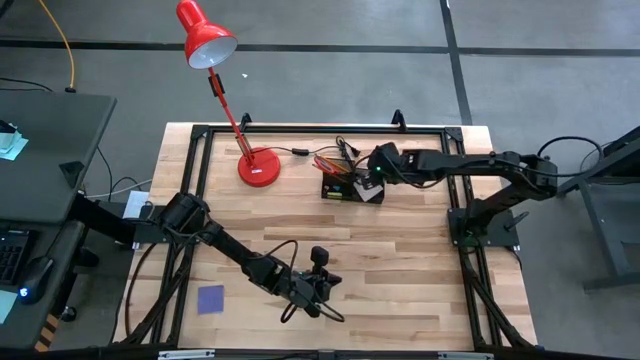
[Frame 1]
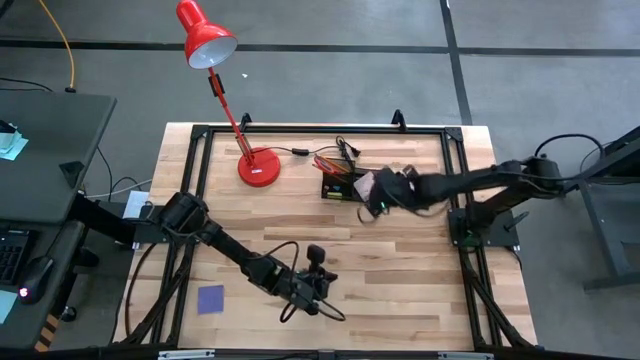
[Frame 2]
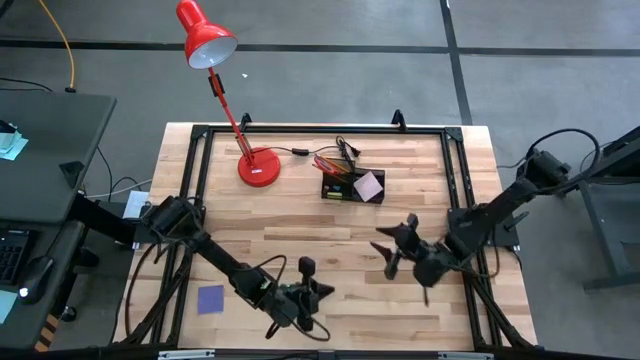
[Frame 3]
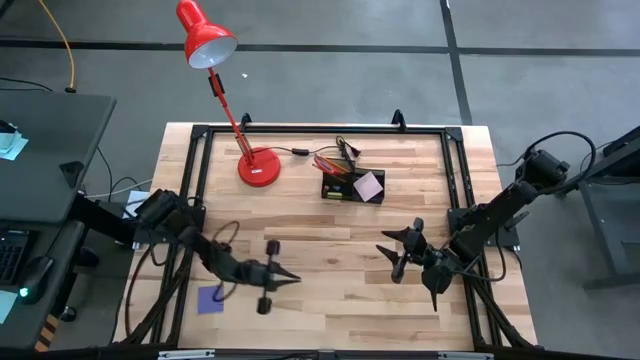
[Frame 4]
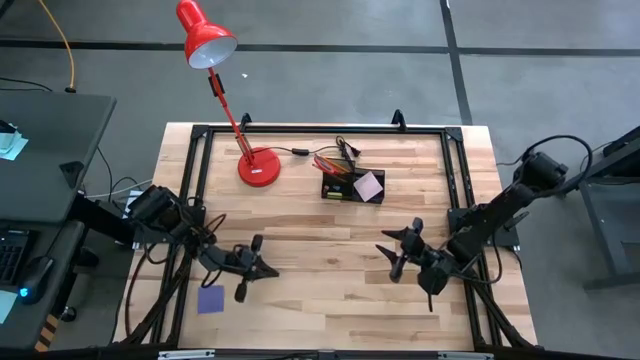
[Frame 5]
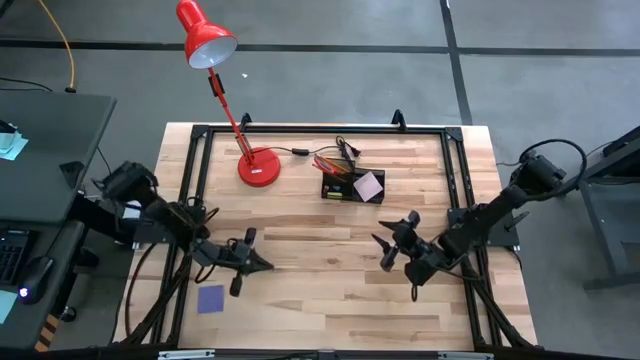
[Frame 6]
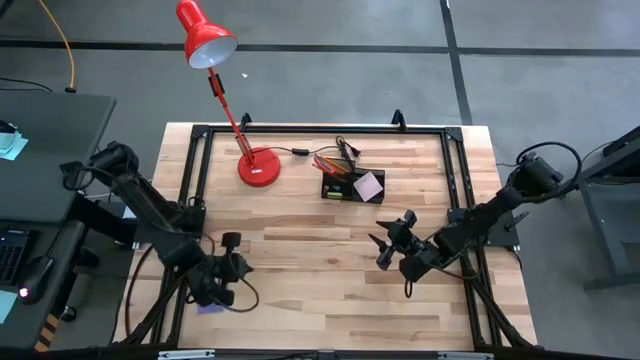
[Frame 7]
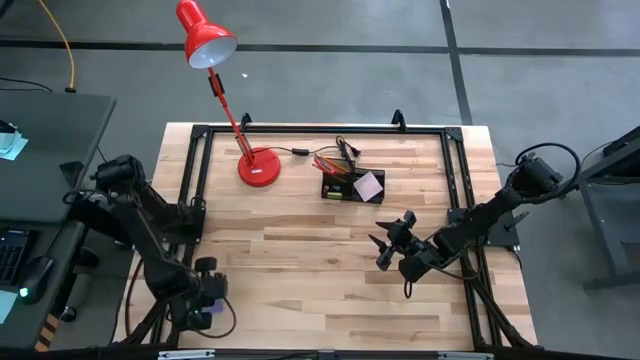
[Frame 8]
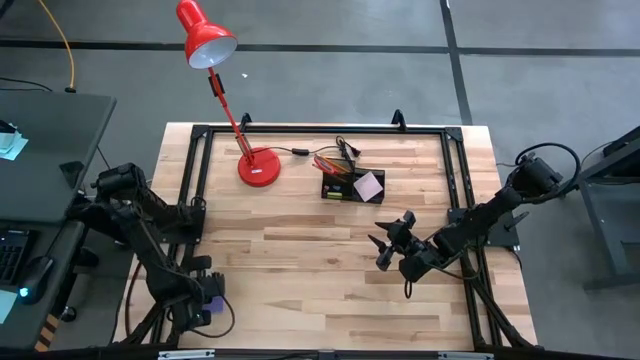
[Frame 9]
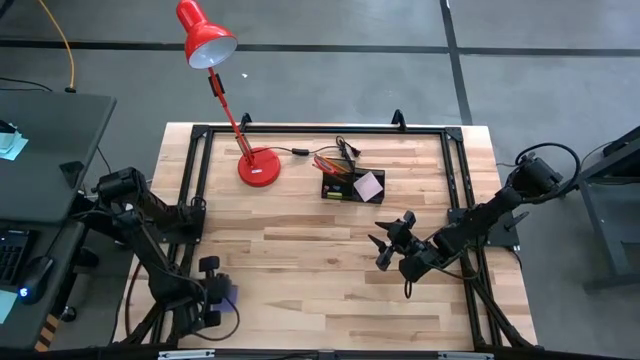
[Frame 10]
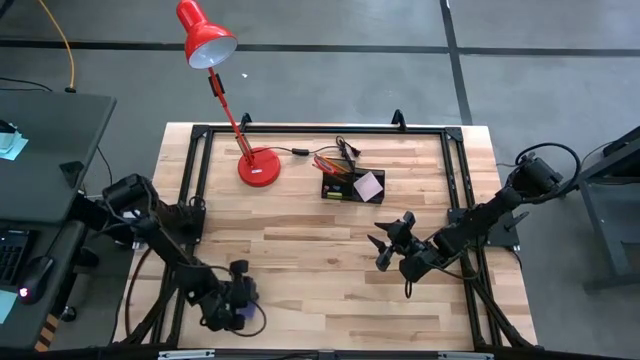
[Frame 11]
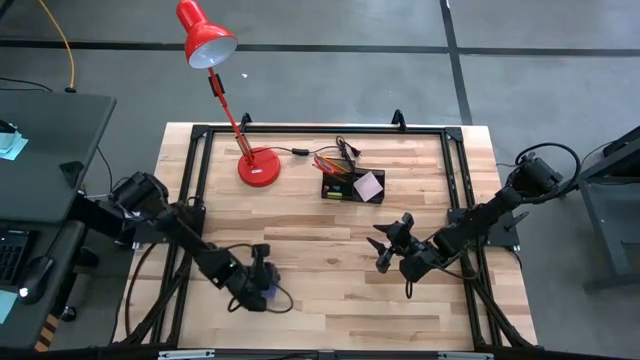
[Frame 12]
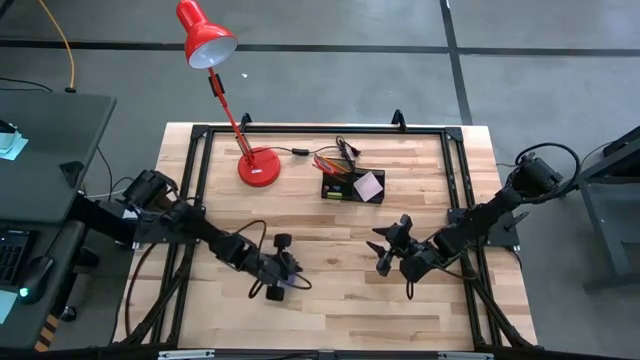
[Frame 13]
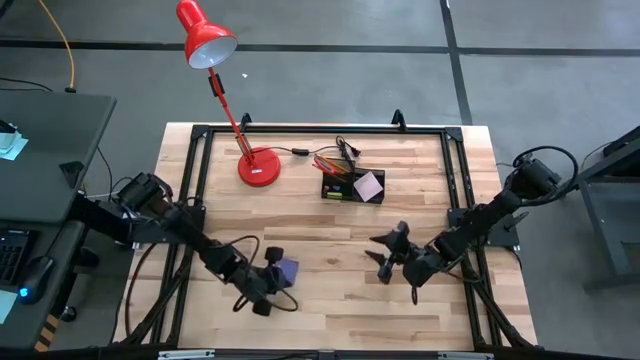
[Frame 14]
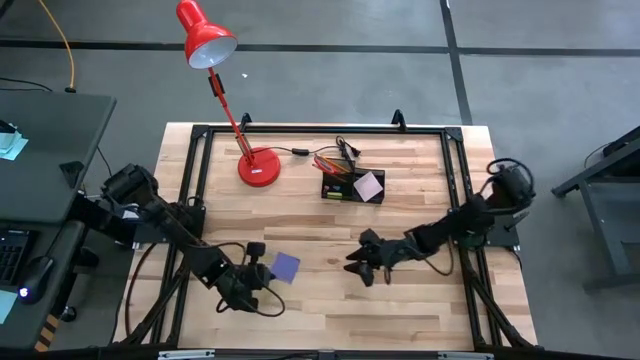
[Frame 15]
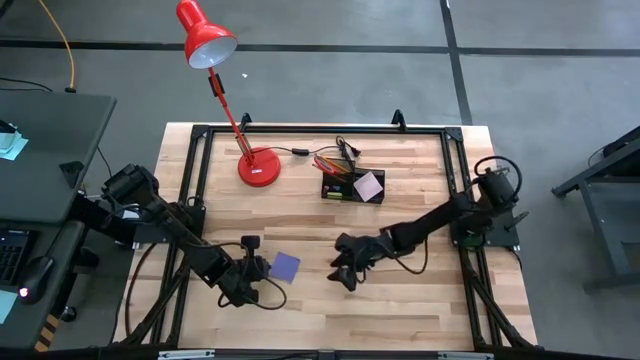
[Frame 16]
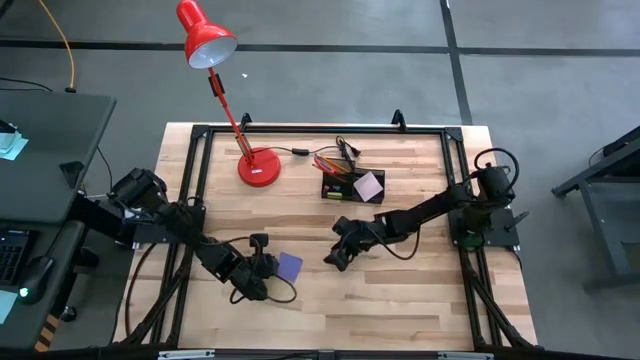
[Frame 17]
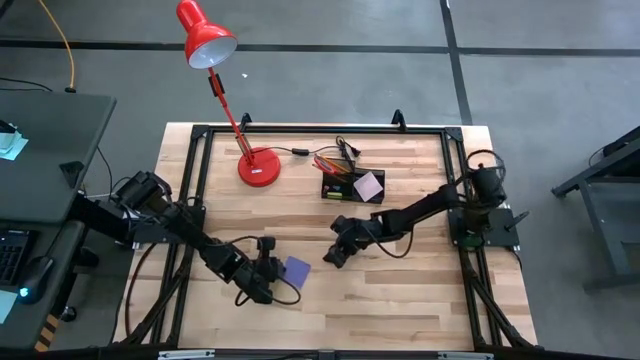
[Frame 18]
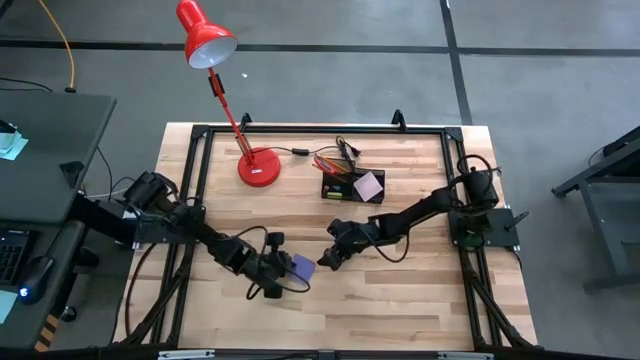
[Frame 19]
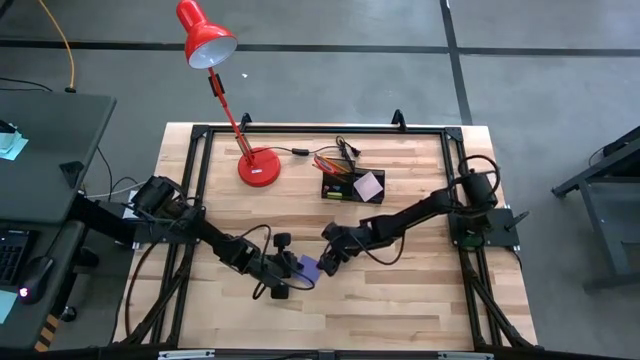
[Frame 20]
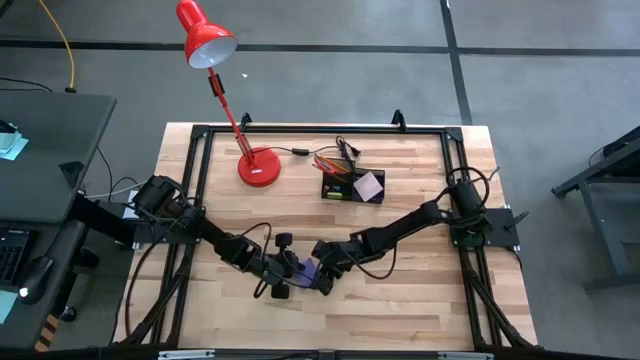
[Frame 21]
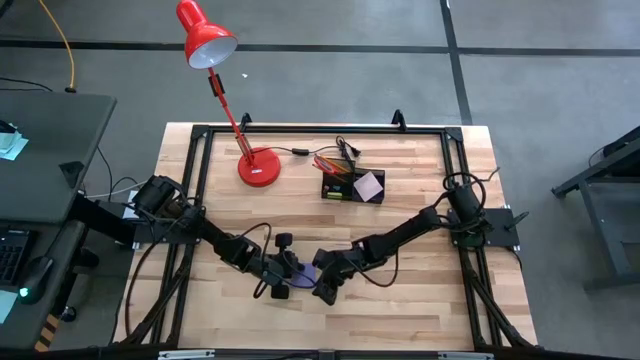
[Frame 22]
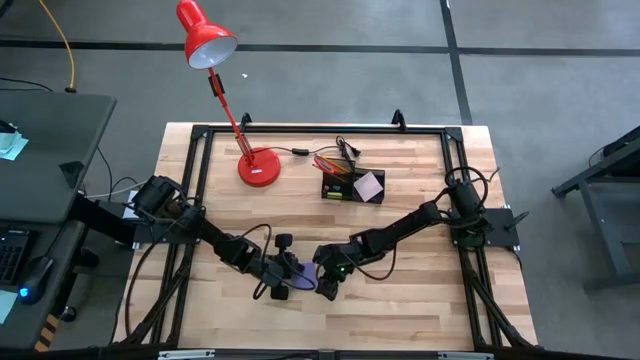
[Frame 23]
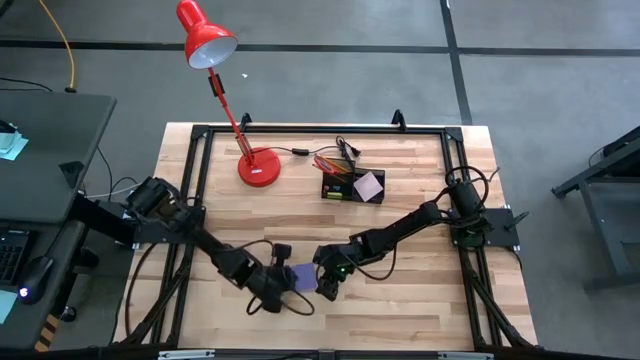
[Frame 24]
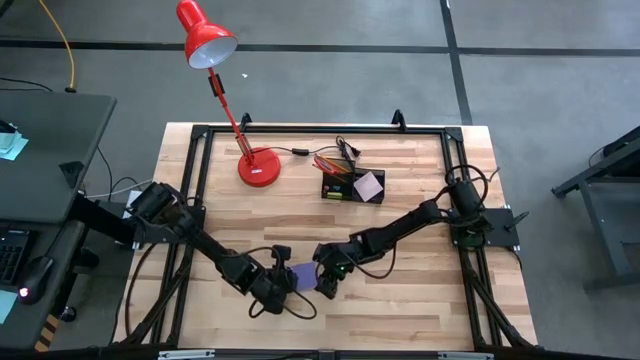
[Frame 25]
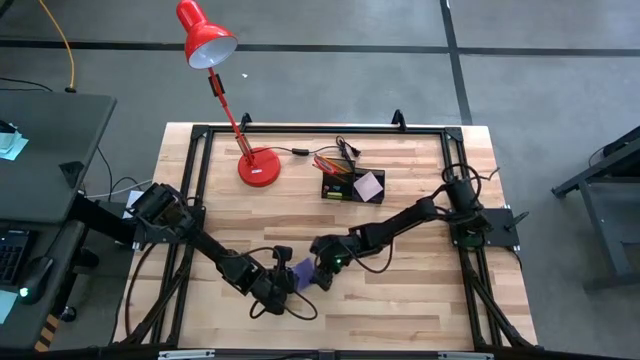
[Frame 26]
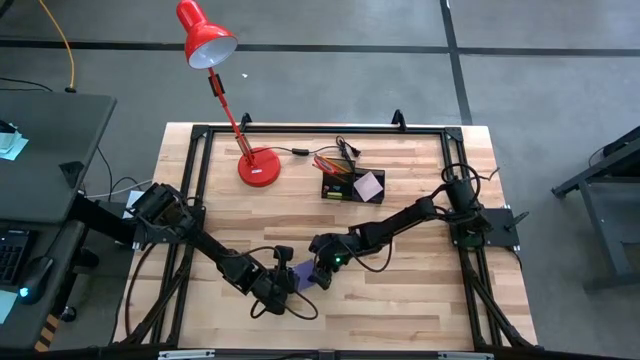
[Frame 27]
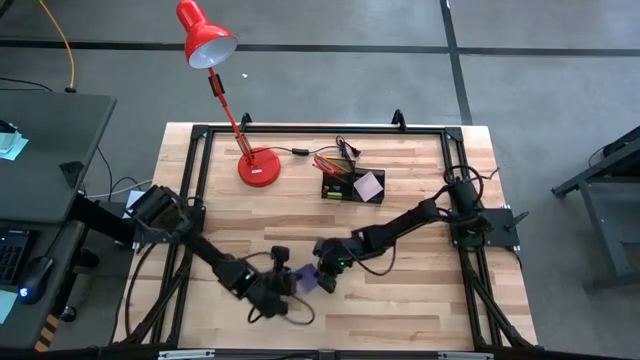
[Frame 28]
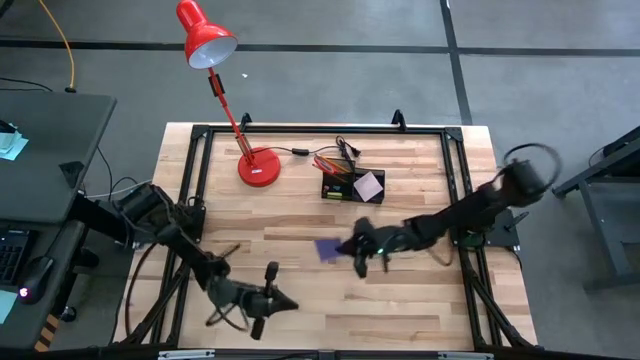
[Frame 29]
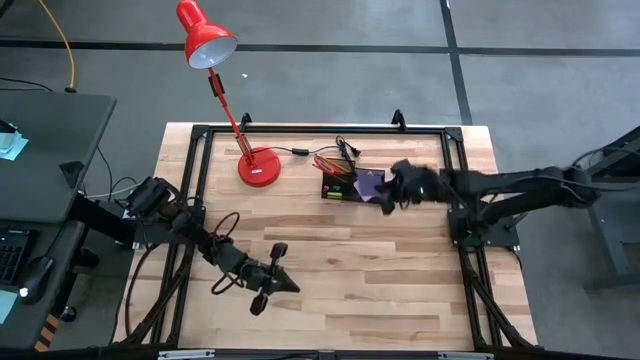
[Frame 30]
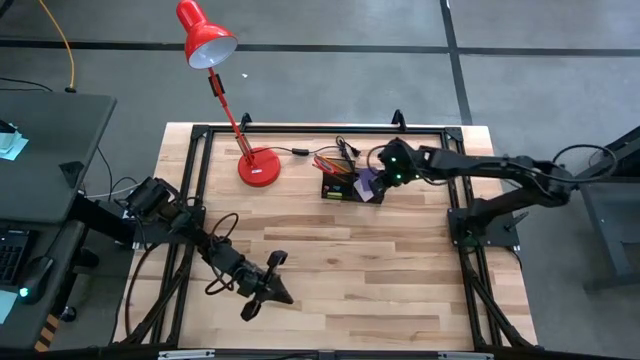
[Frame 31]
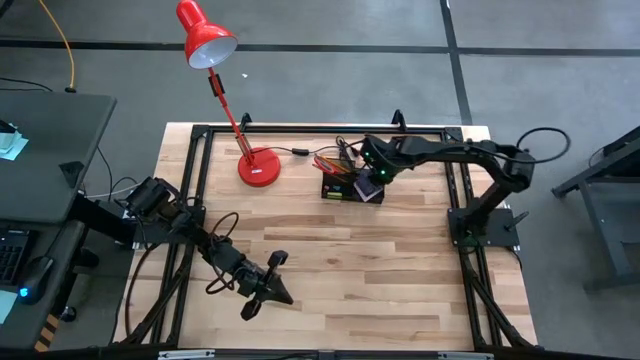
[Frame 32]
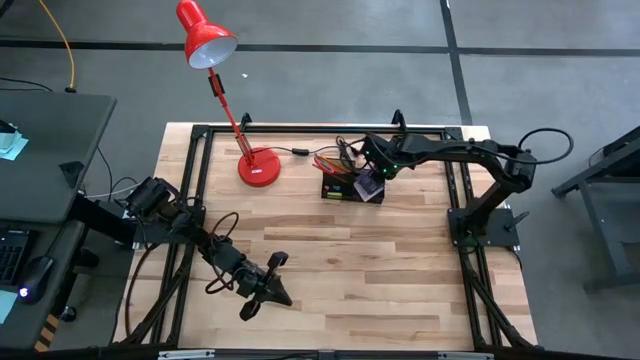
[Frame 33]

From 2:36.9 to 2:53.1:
Task: Pick and place office supplies into organizer
Put the blue sticky notes into the desk organizer

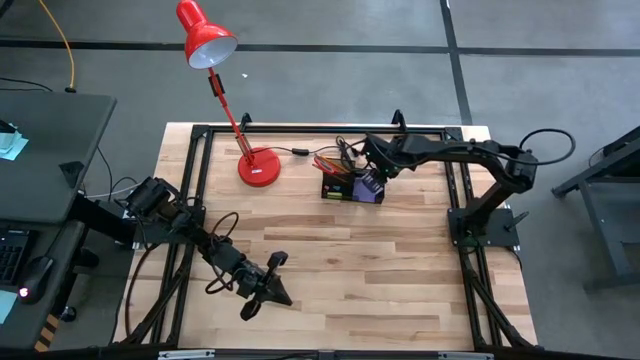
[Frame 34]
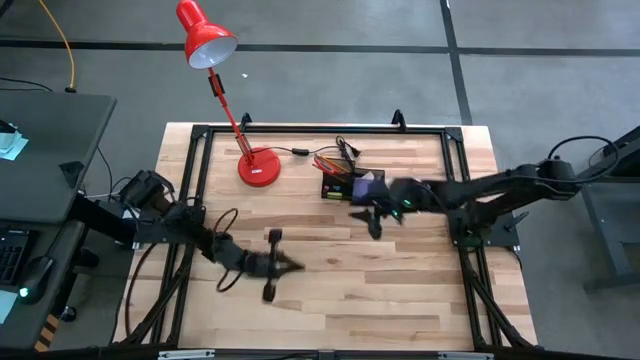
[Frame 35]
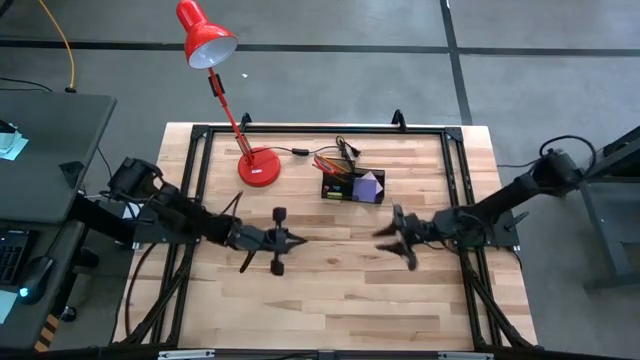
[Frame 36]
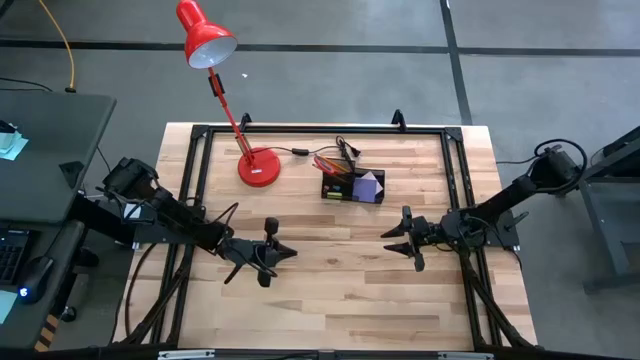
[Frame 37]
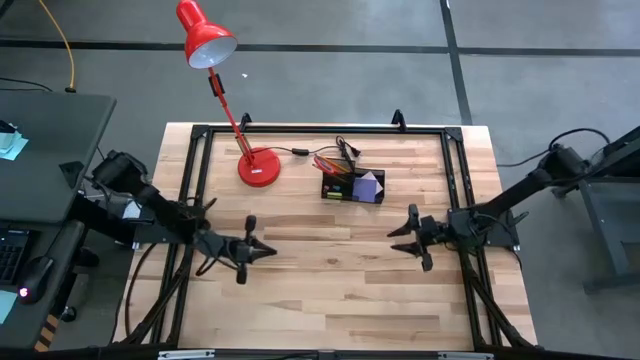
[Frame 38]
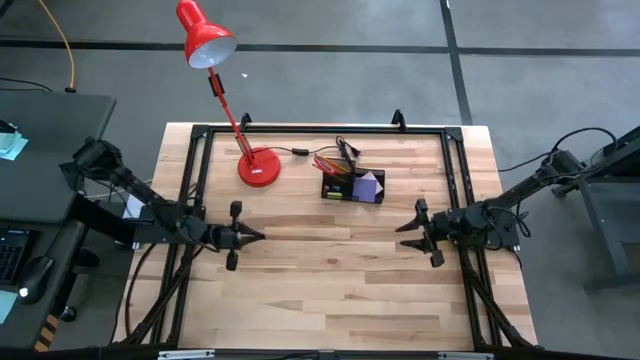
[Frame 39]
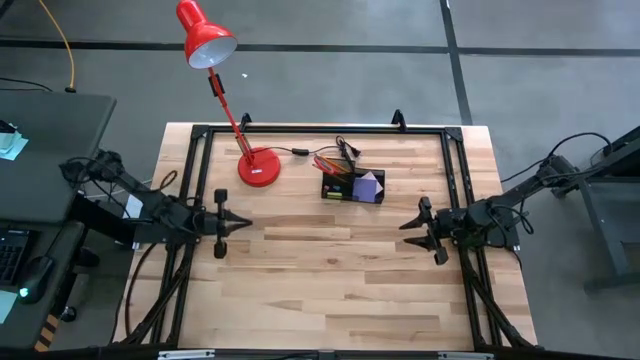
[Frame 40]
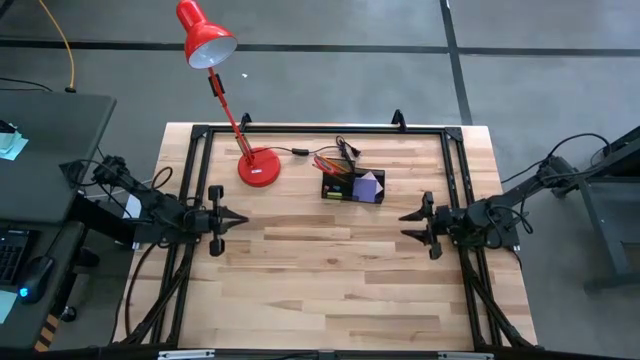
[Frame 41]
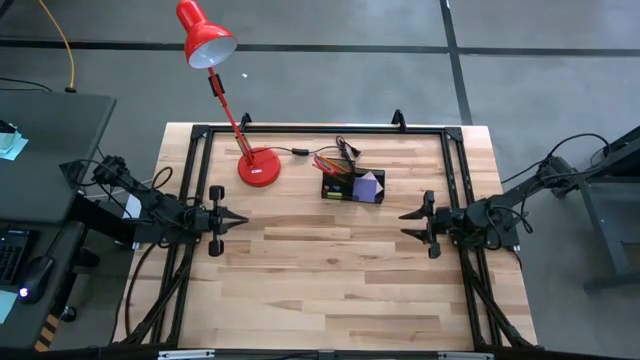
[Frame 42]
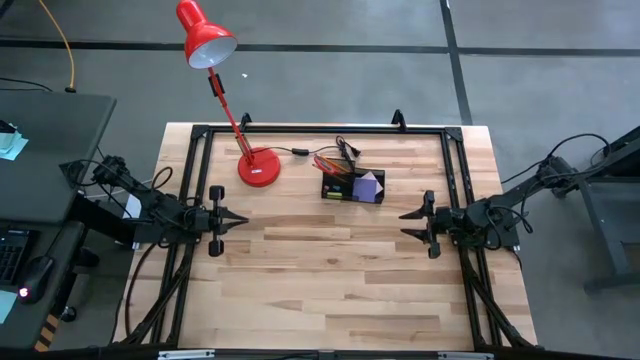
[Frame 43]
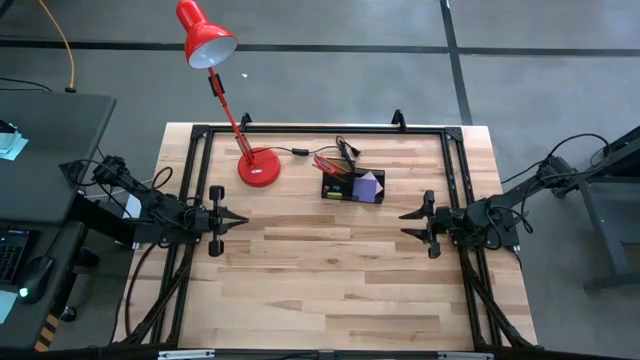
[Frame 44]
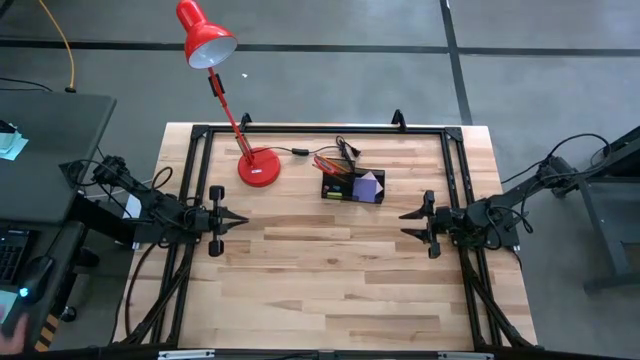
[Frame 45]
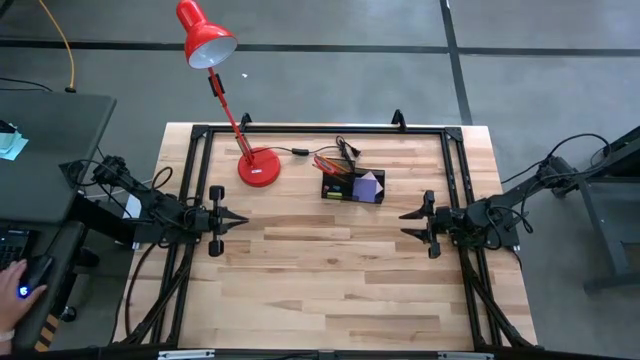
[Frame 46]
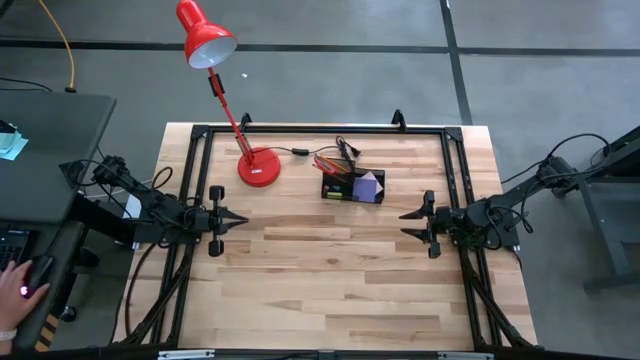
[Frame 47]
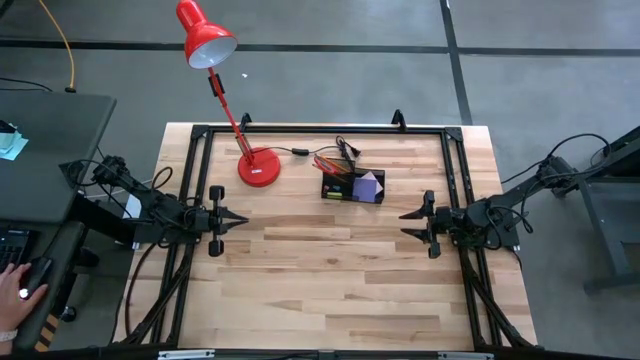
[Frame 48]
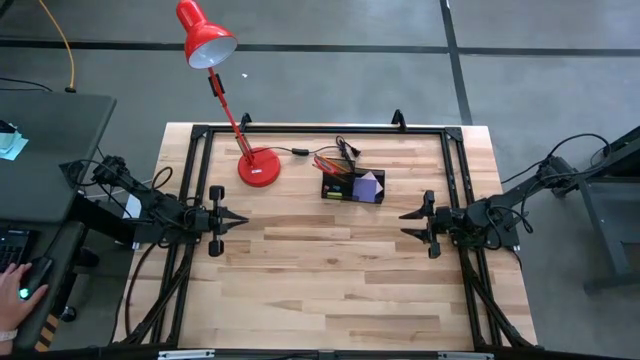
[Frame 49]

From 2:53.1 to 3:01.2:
Return to Home Position
